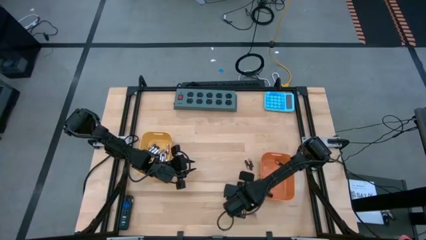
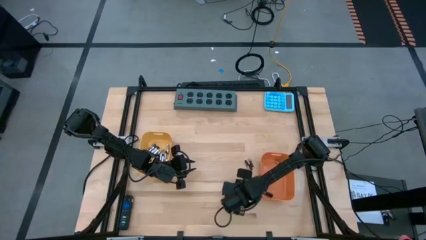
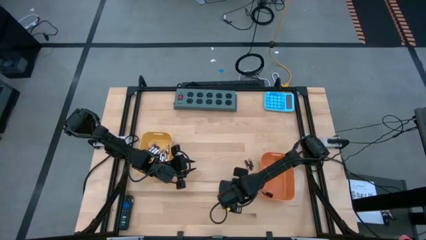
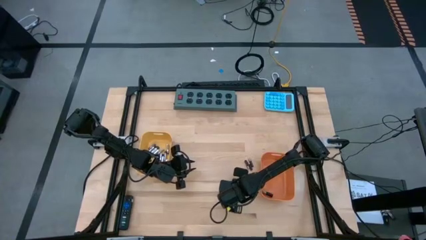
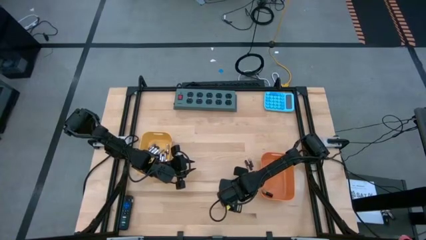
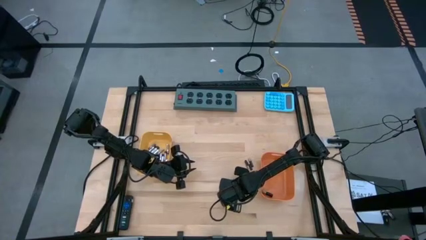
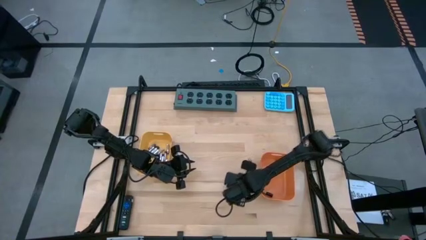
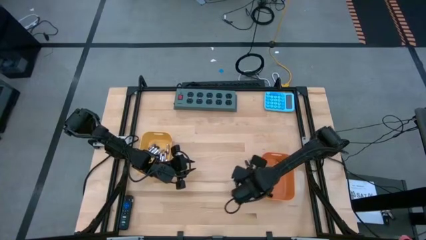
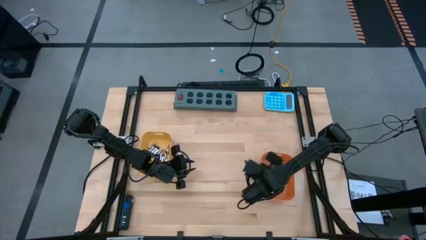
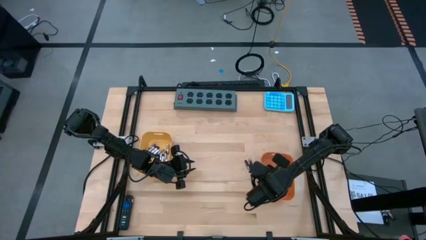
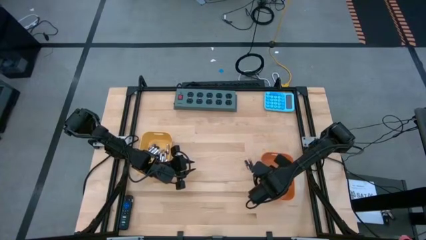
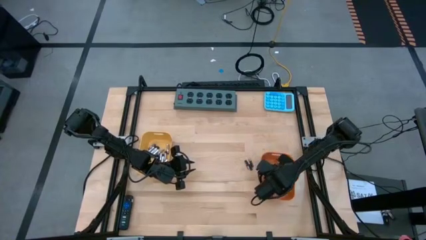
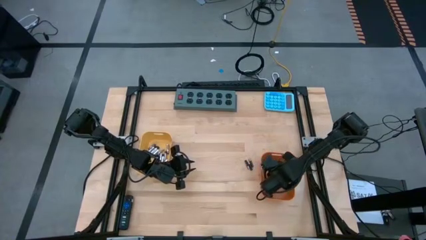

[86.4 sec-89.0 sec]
Task: Sort batteries
Put the black battery into the orange bin

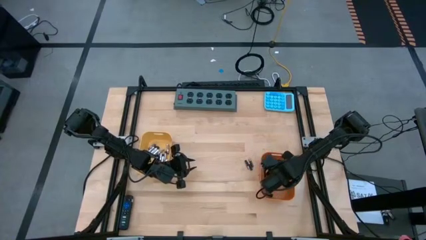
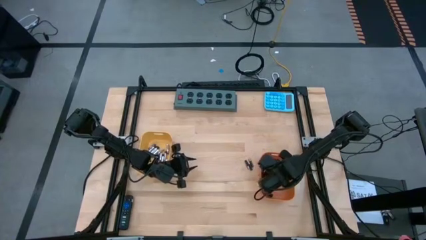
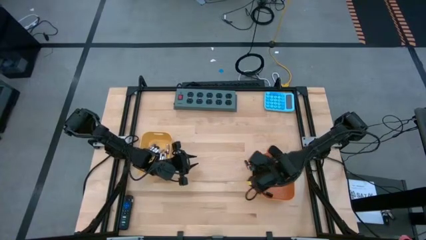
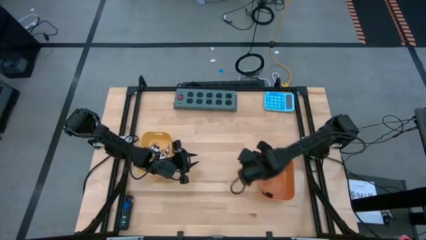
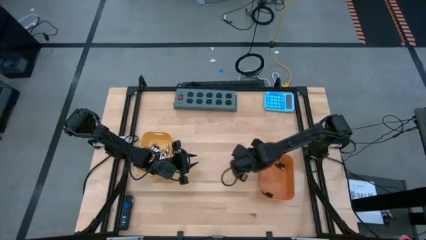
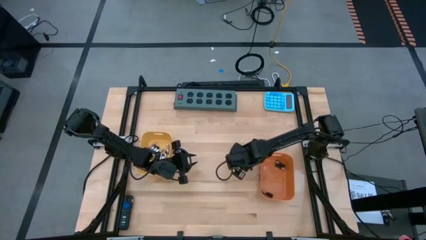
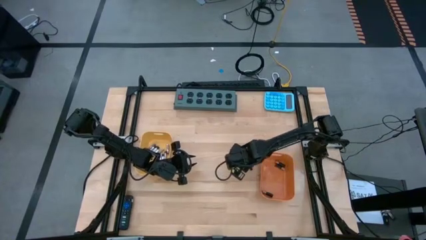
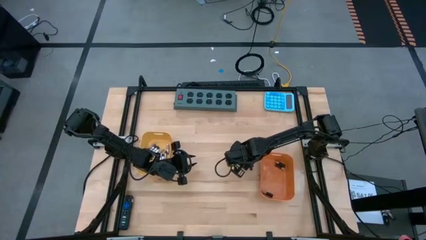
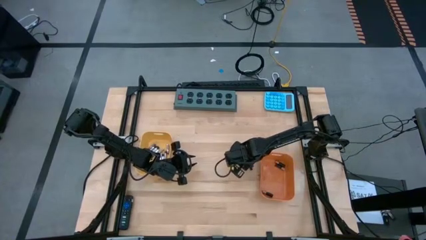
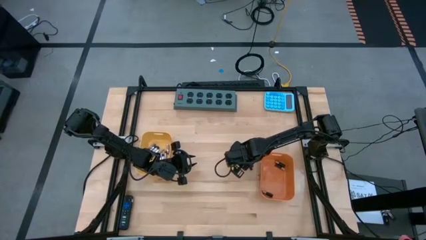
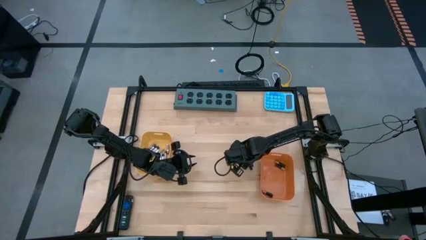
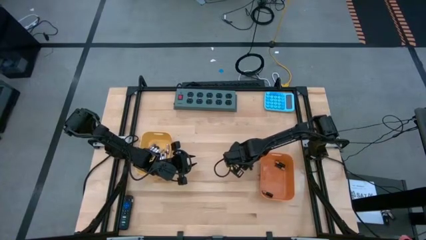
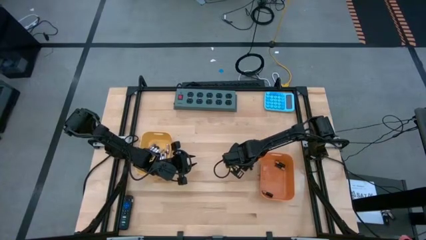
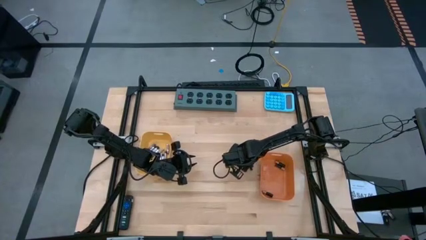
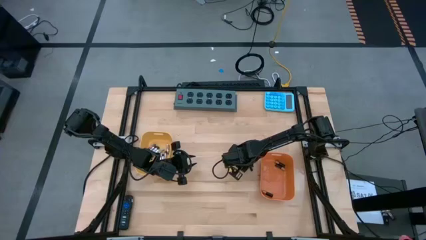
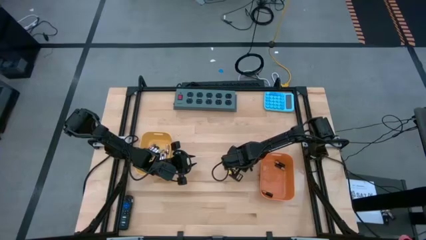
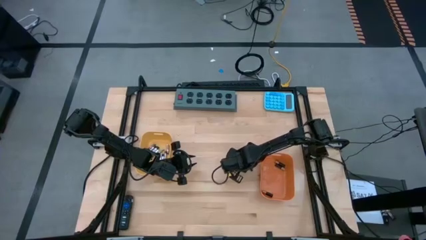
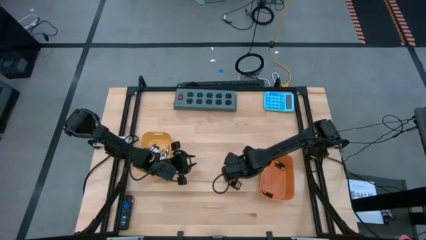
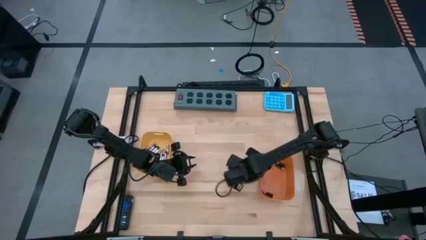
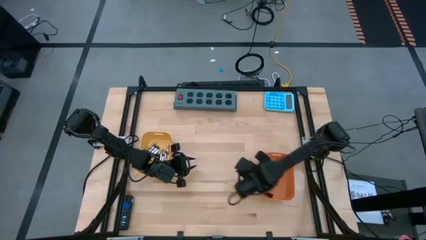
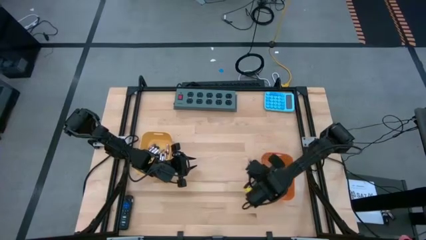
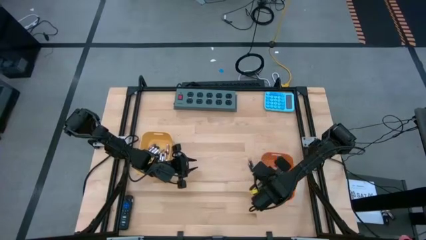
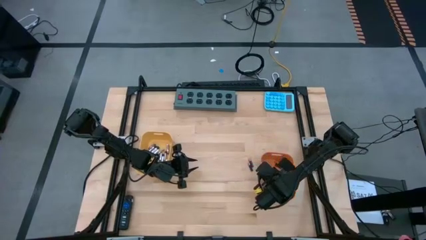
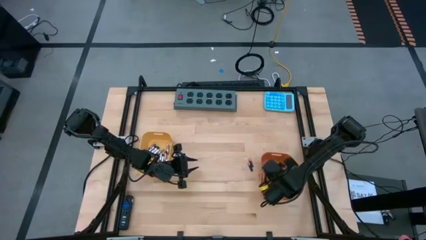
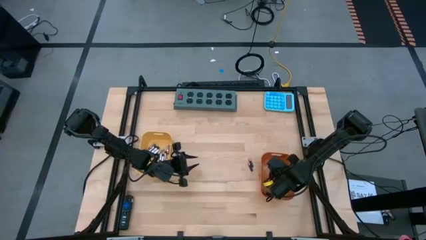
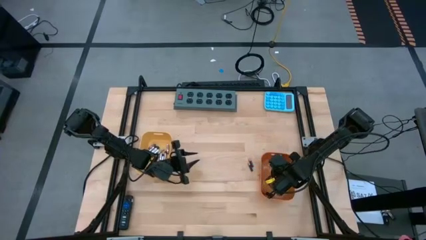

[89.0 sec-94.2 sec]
Put the black battery into the orange bin

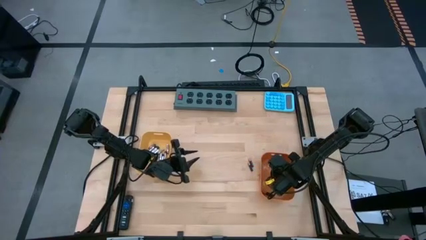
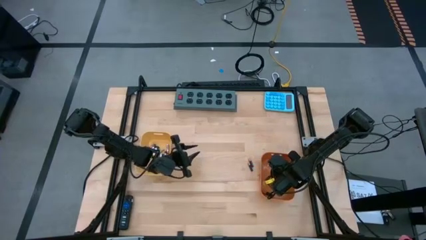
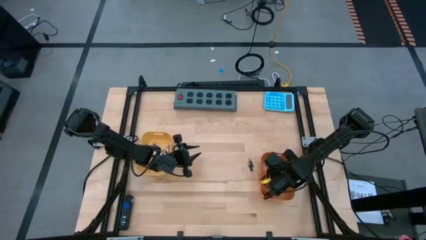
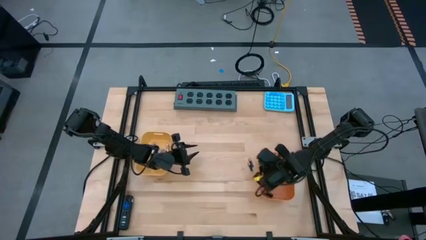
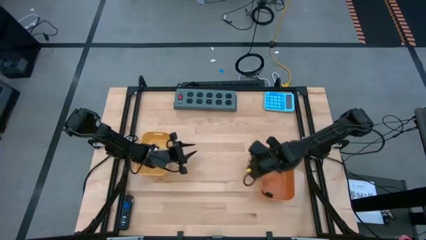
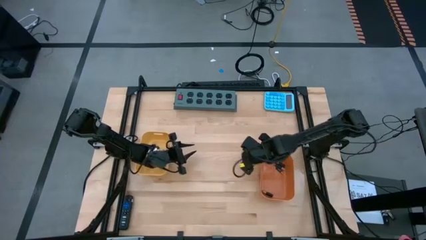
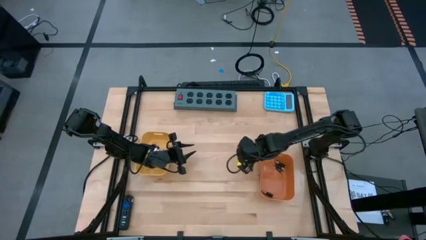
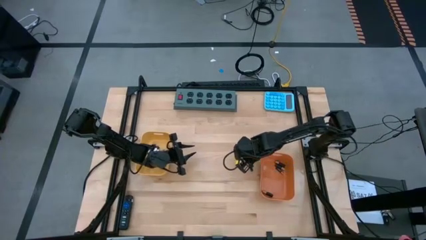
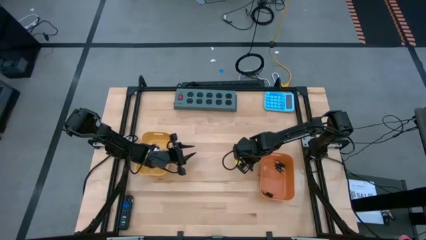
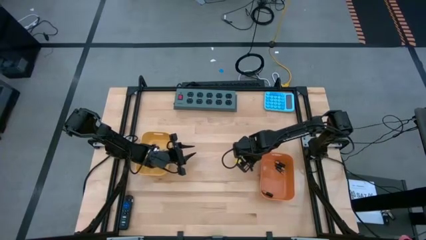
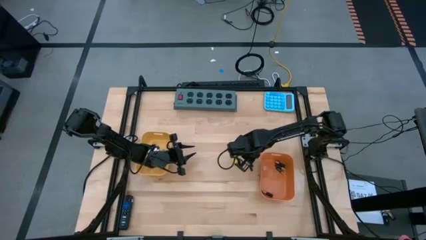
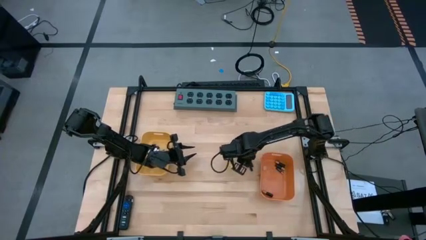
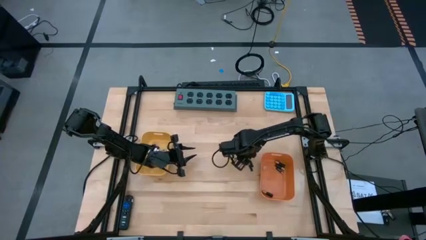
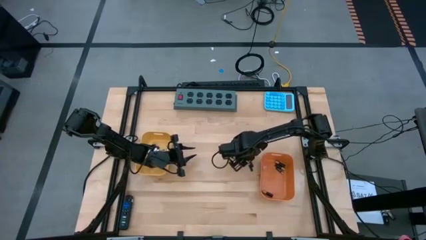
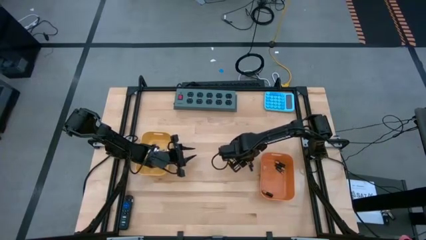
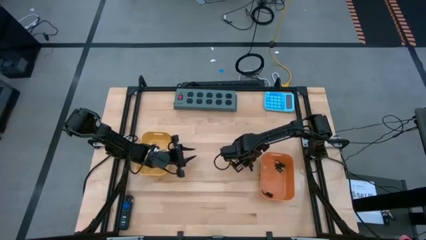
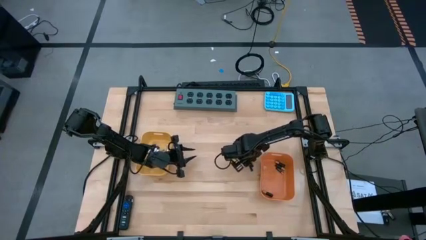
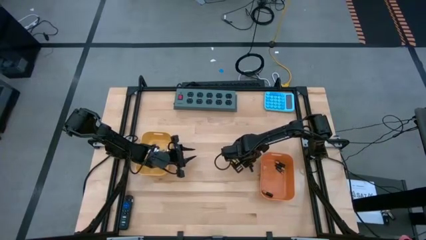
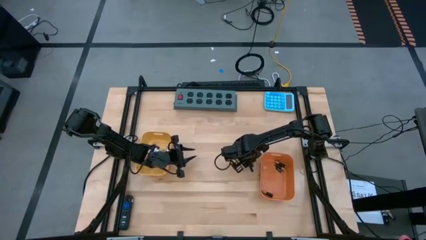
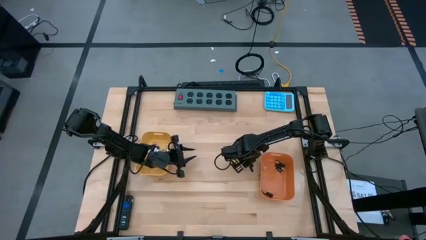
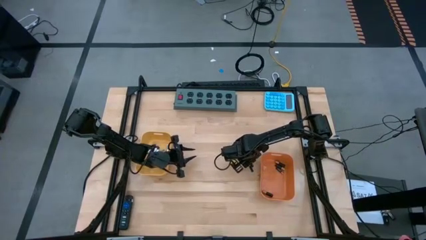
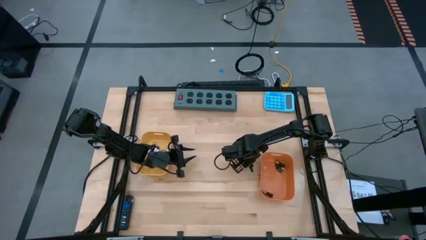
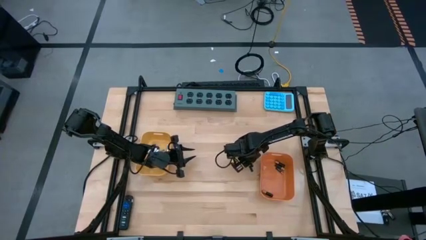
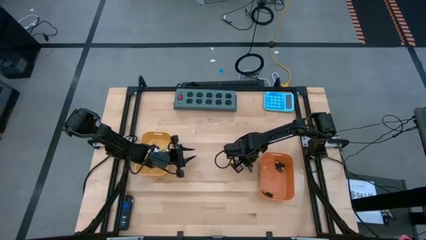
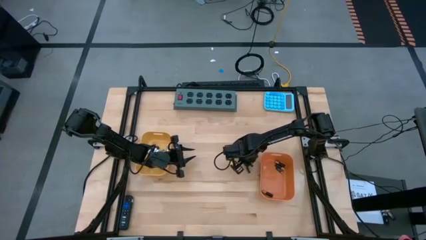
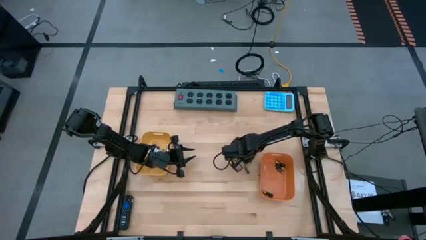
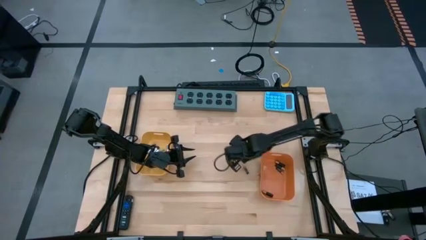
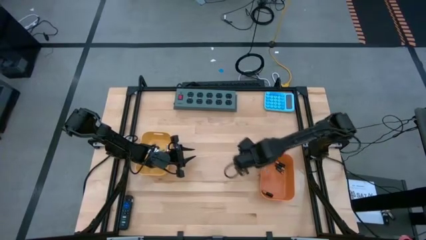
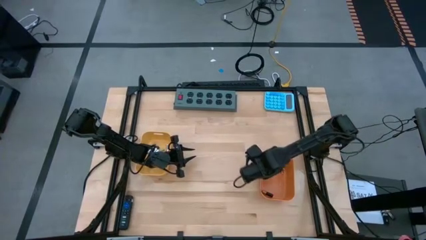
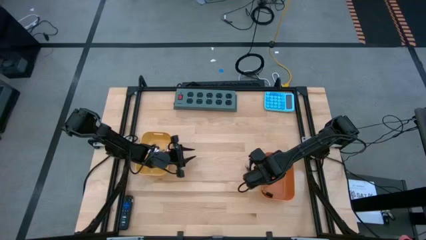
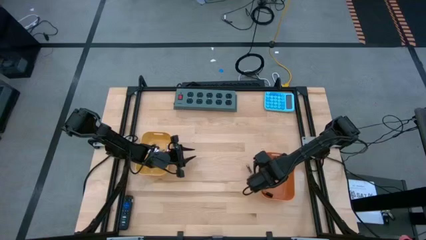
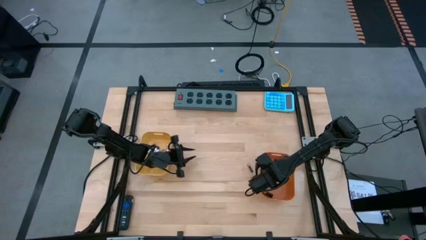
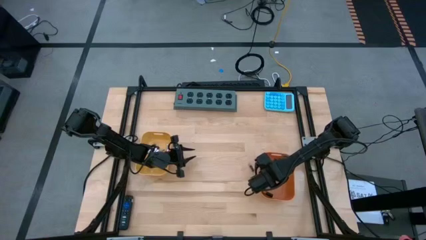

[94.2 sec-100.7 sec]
Put the black battery into the orange bin

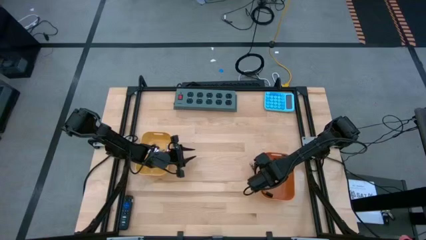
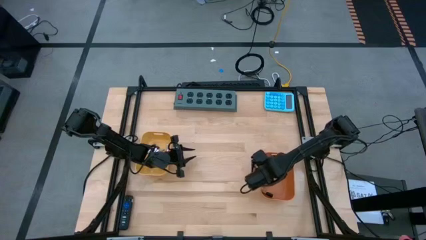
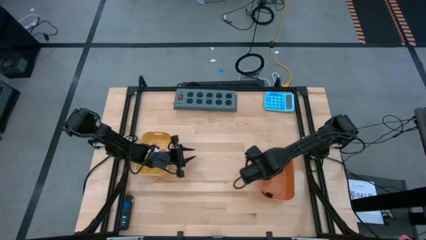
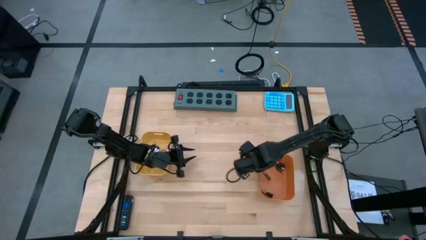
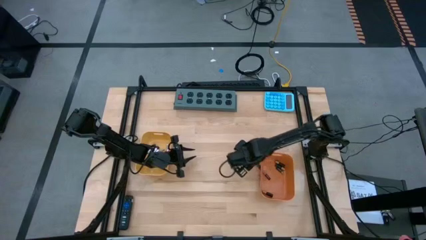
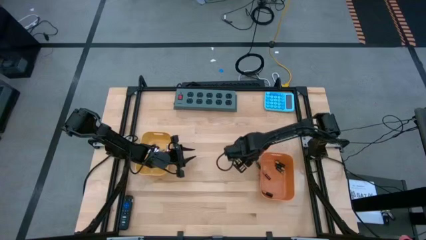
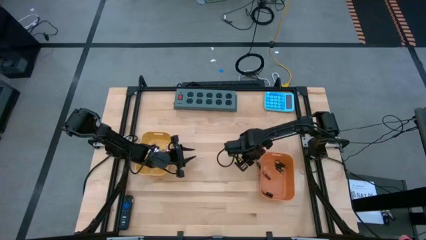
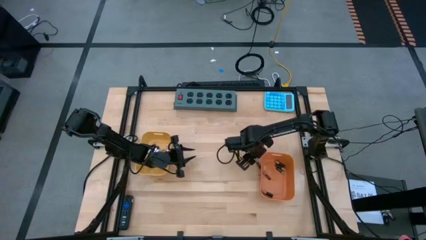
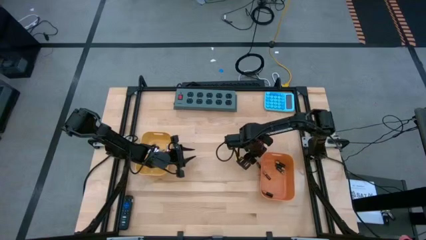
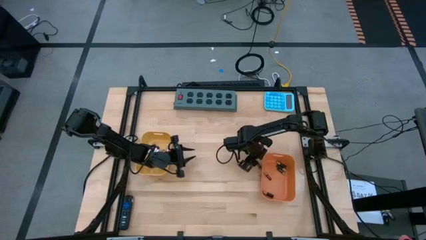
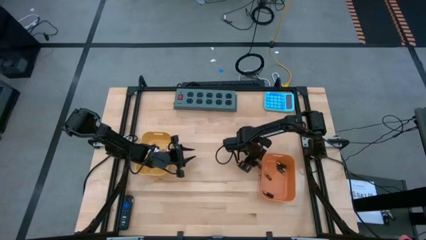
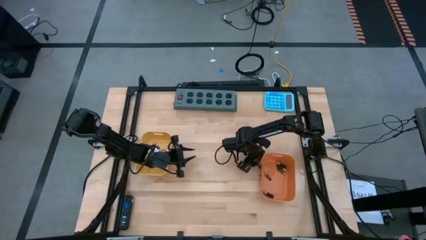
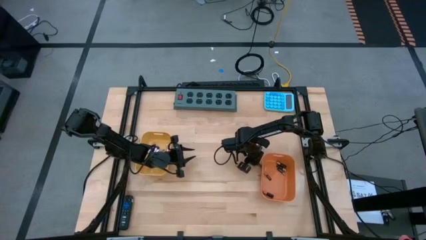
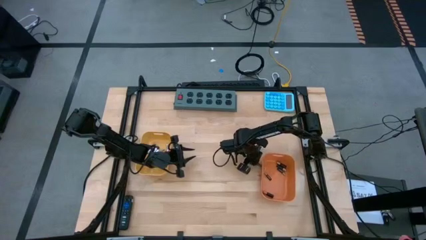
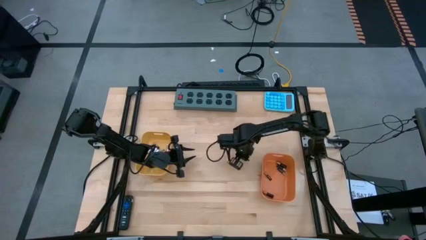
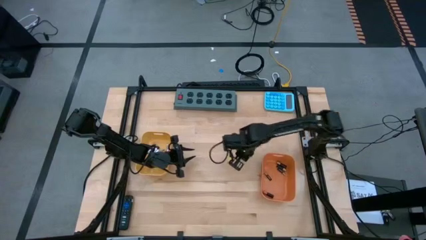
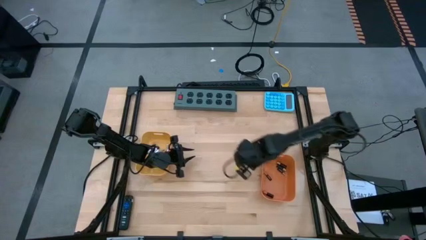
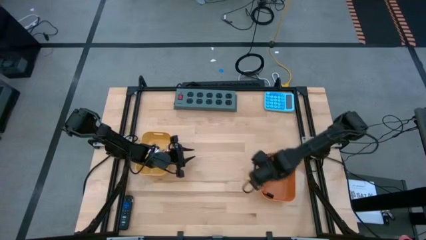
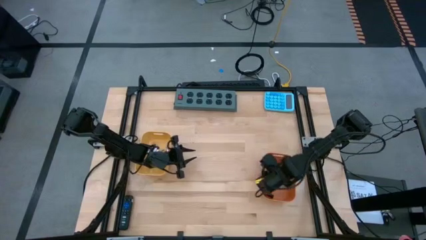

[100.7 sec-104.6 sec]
Put the black battery into the orange bin
